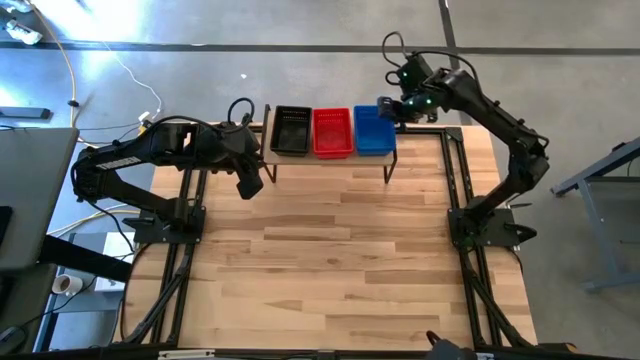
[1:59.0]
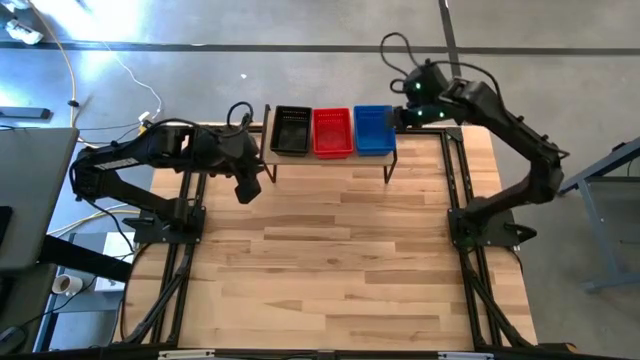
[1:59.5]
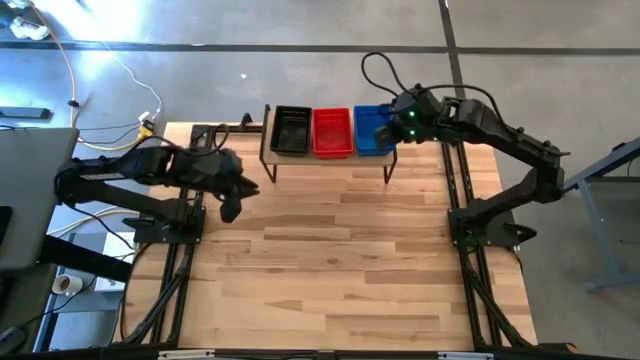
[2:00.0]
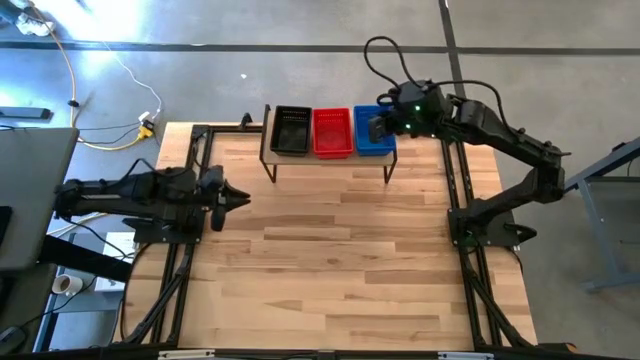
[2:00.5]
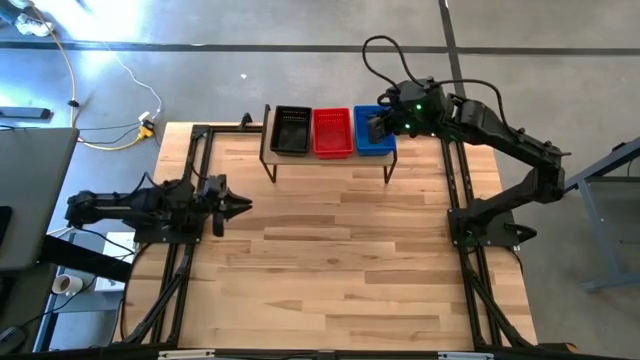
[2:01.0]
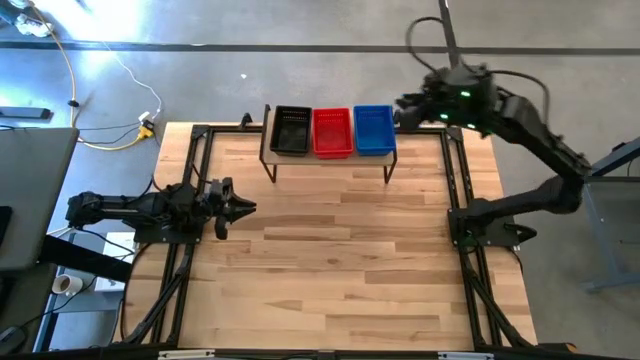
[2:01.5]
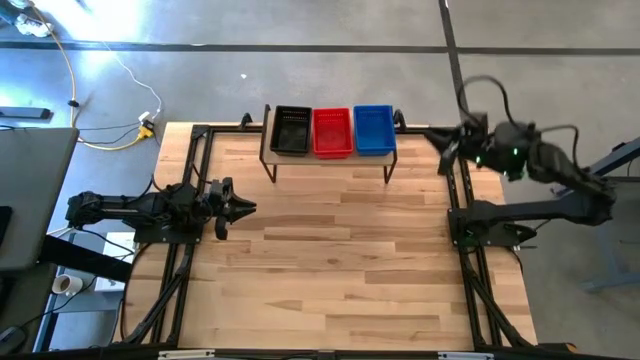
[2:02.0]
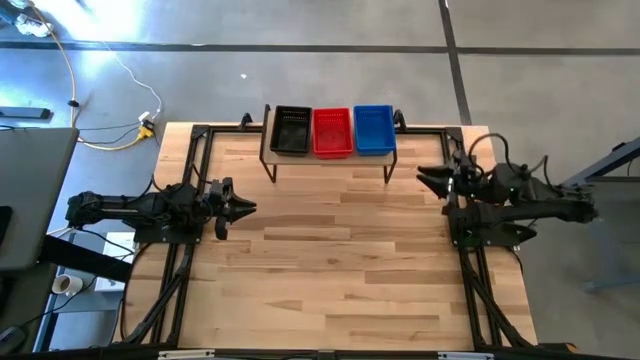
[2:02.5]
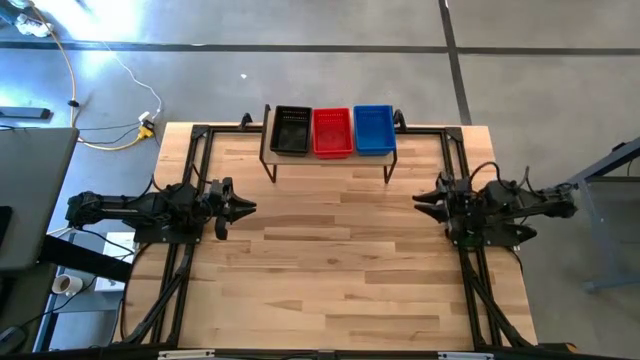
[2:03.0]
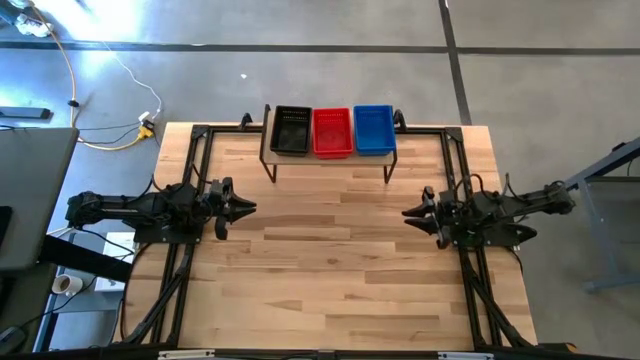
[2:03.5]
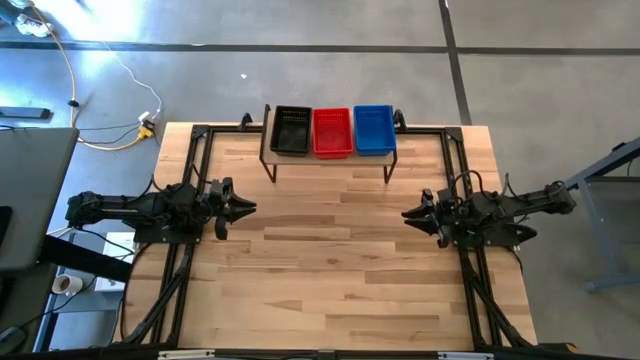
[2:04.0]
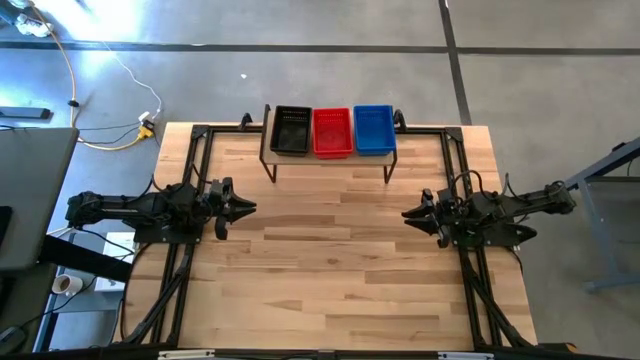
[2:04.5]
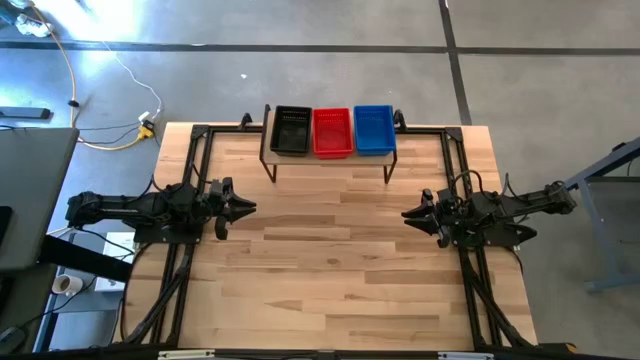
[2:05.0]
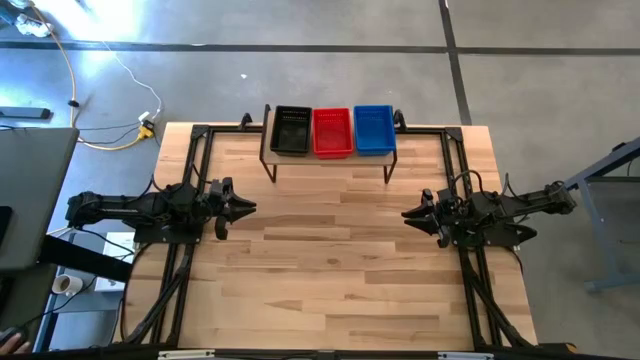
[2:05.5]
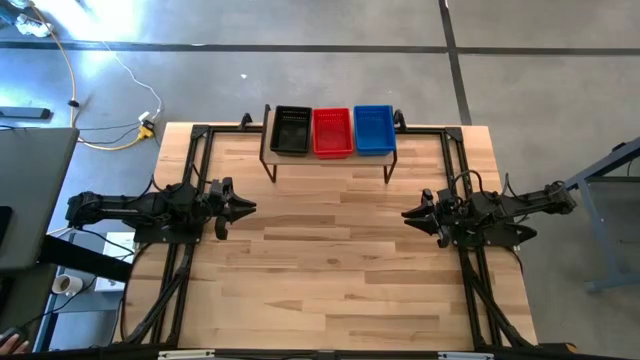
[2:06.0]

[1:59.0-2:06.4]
Task: Stack baskets on shelf by color
Return to Home Position

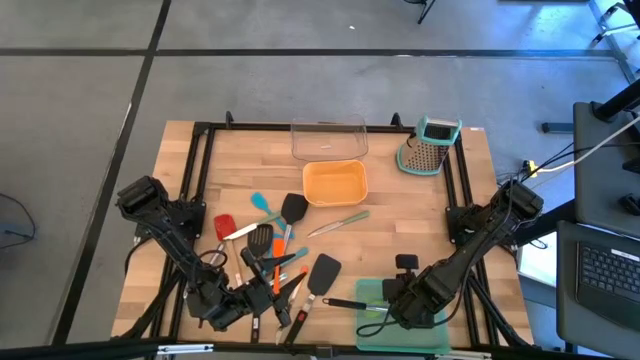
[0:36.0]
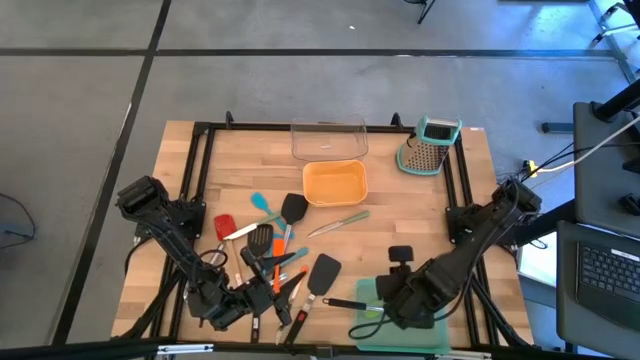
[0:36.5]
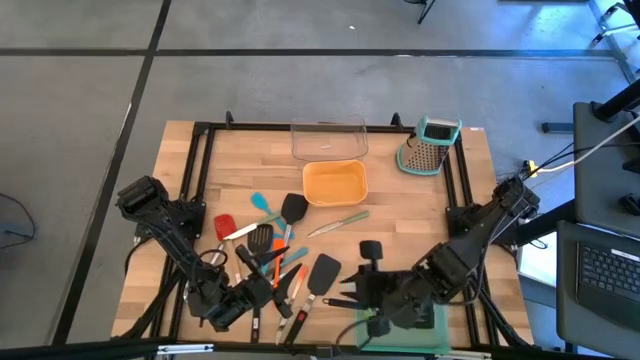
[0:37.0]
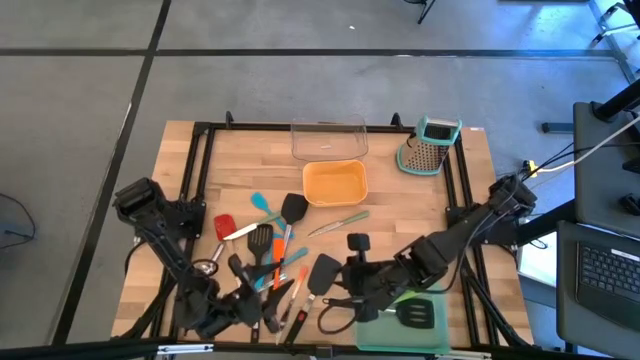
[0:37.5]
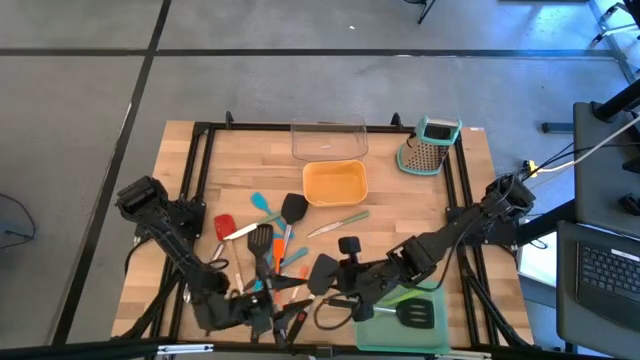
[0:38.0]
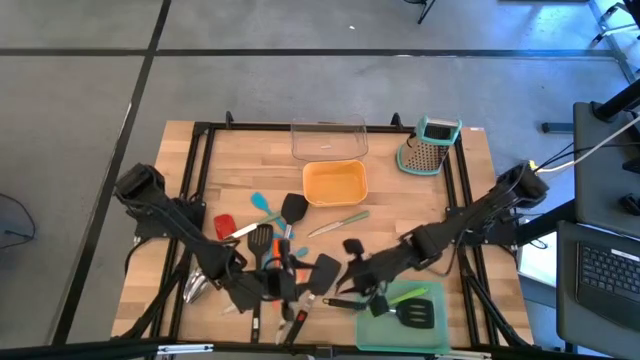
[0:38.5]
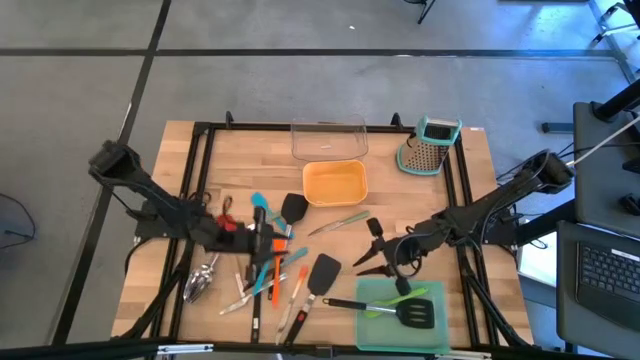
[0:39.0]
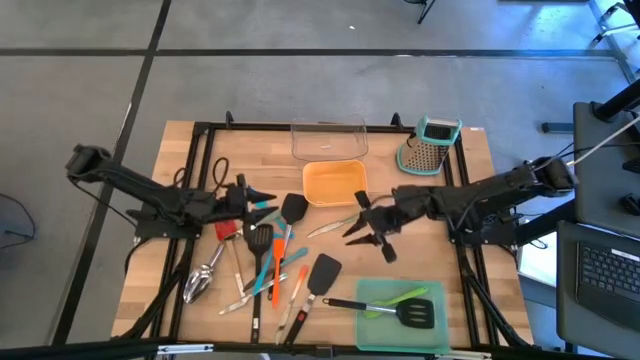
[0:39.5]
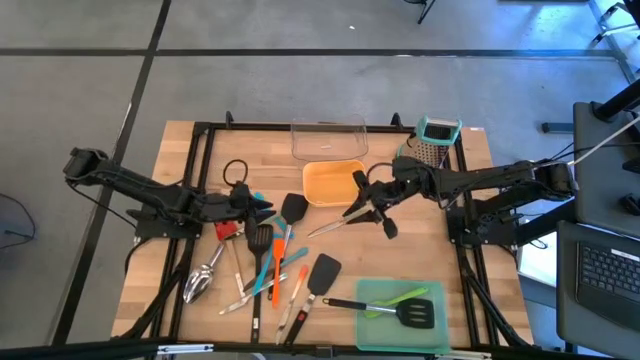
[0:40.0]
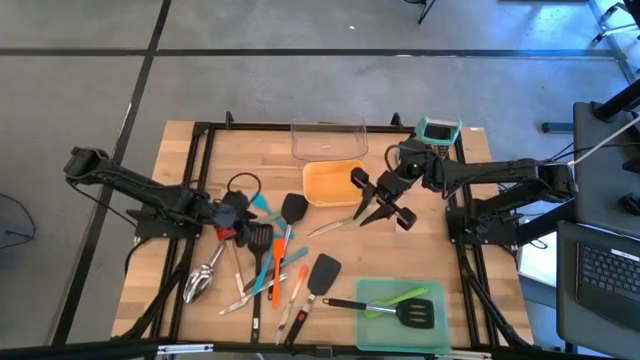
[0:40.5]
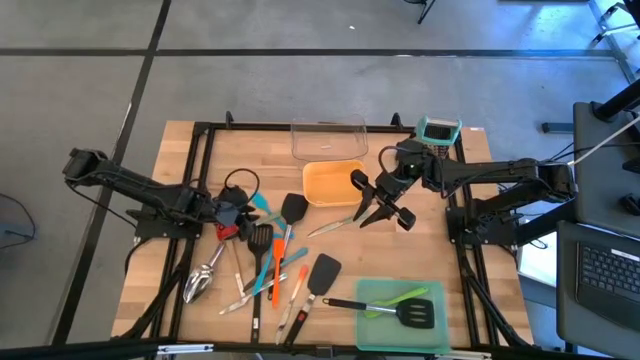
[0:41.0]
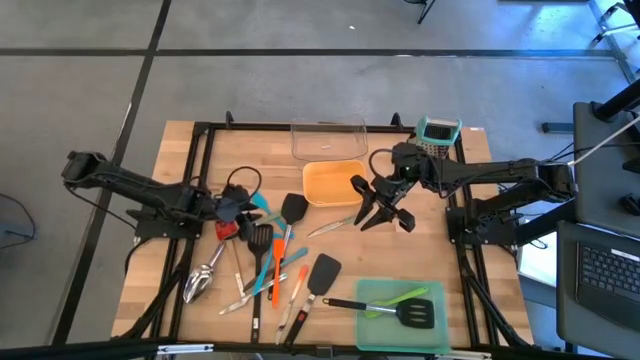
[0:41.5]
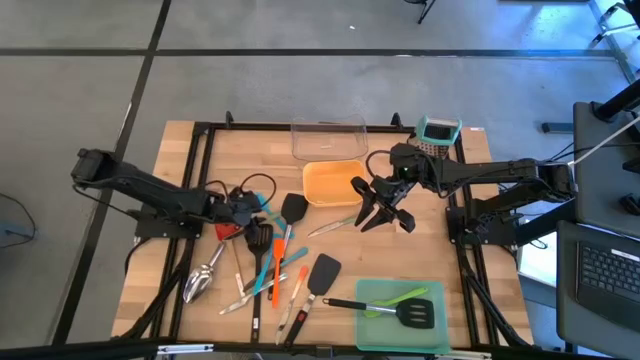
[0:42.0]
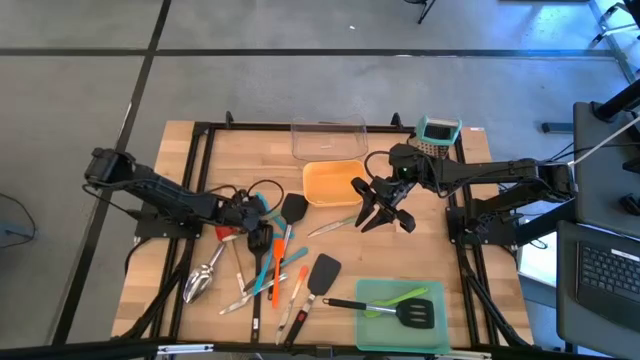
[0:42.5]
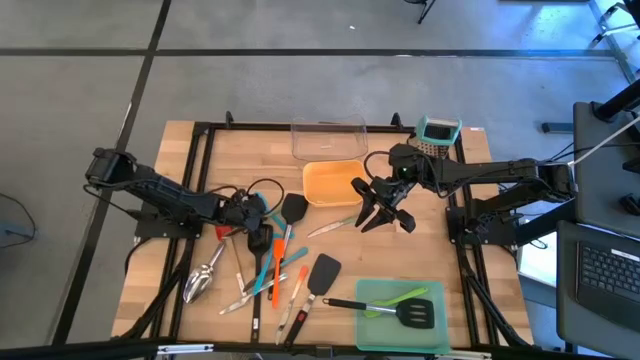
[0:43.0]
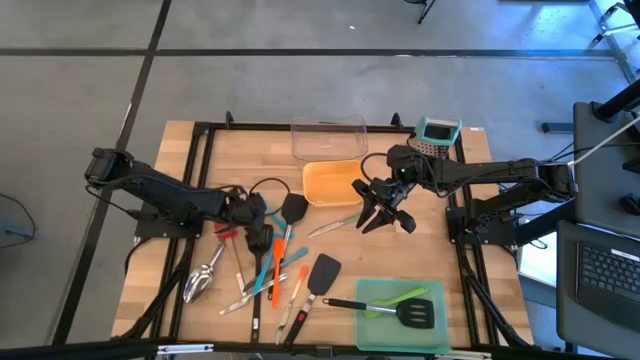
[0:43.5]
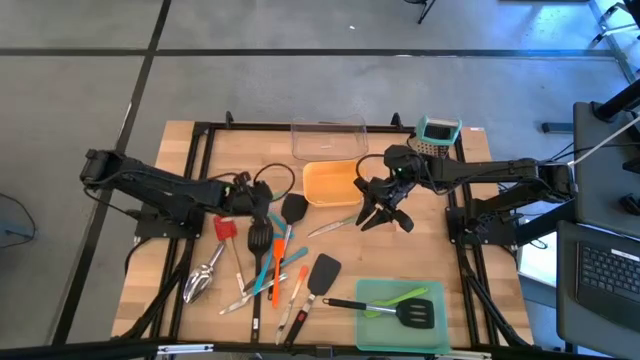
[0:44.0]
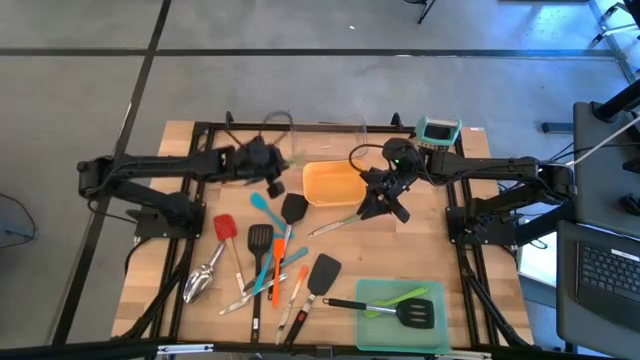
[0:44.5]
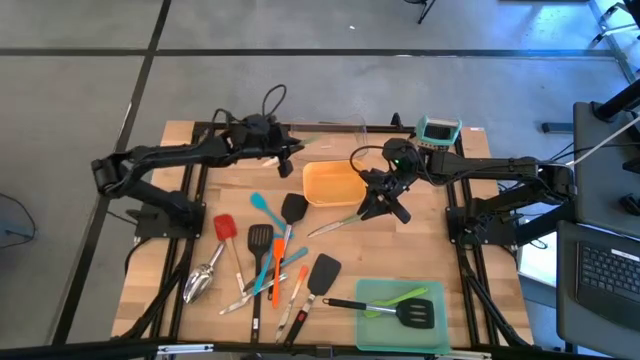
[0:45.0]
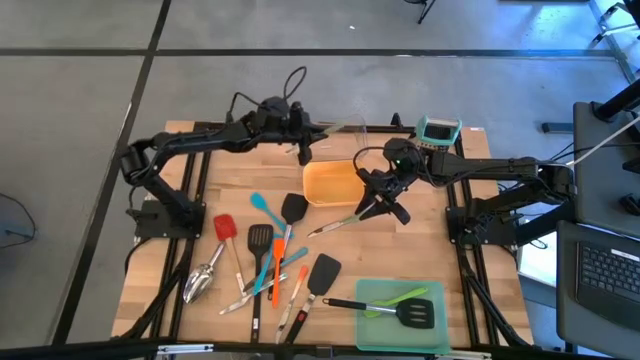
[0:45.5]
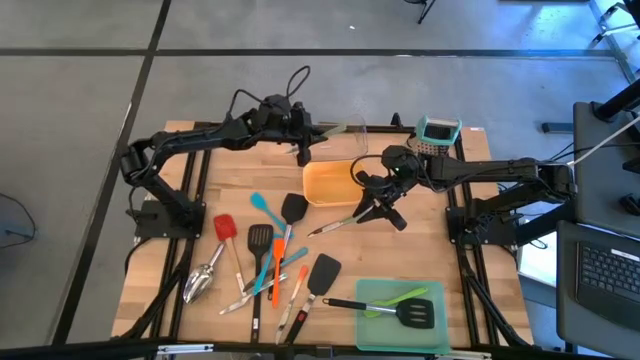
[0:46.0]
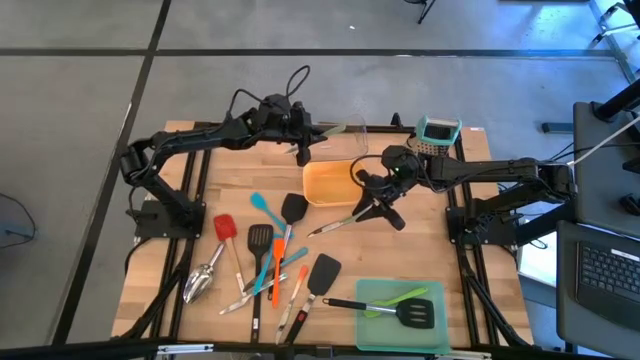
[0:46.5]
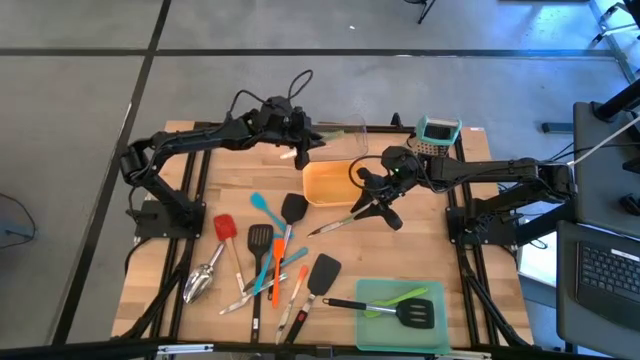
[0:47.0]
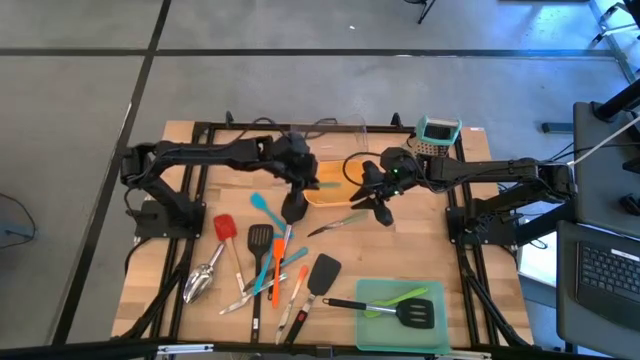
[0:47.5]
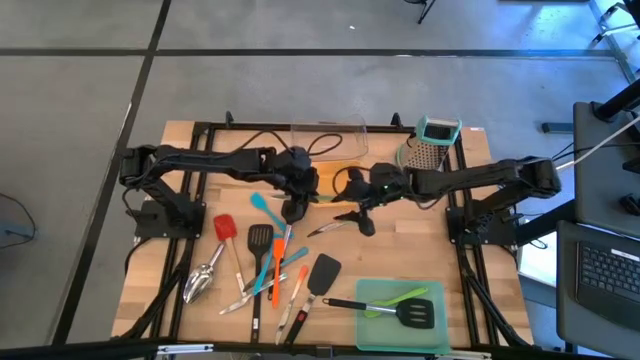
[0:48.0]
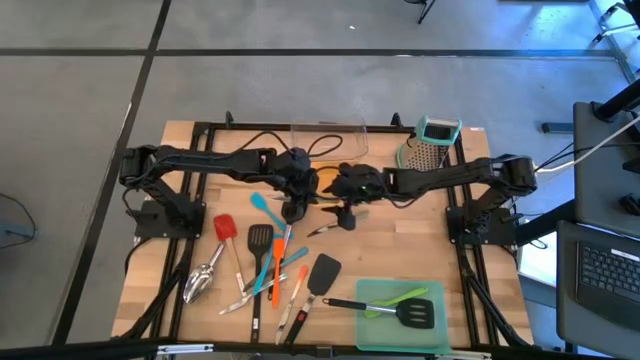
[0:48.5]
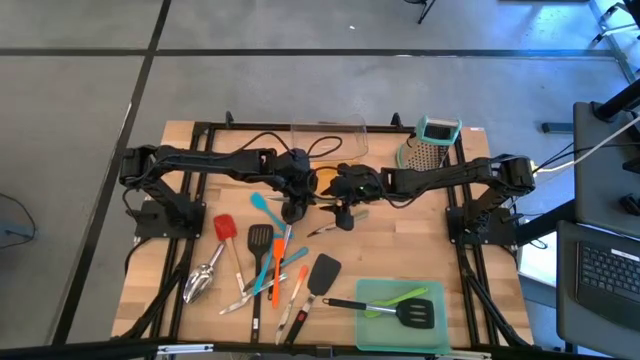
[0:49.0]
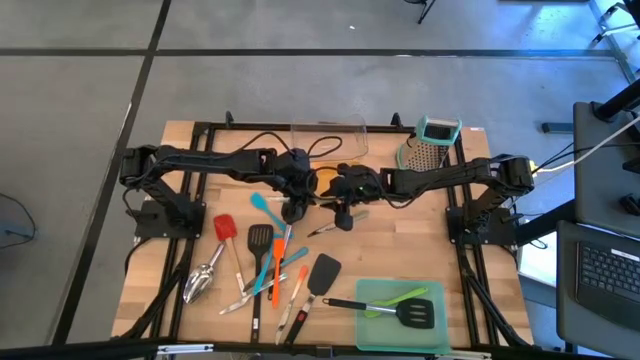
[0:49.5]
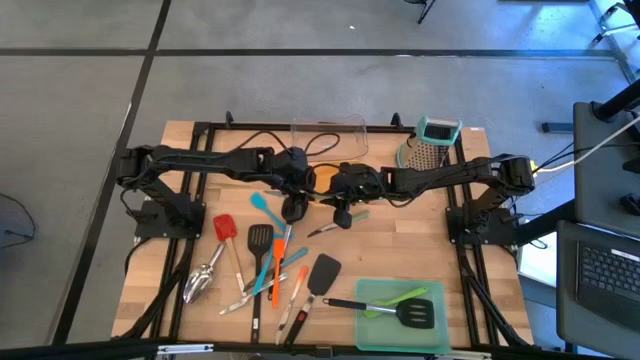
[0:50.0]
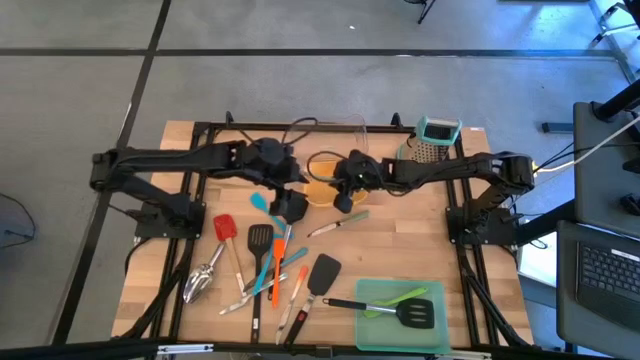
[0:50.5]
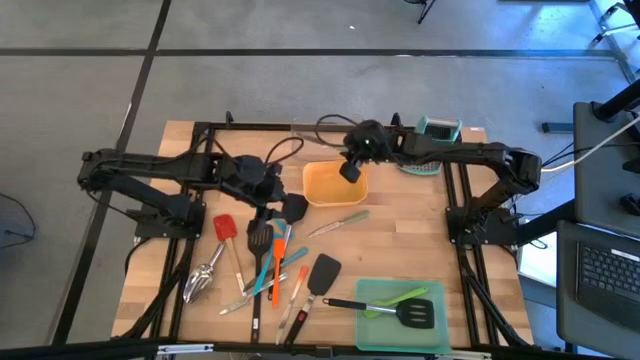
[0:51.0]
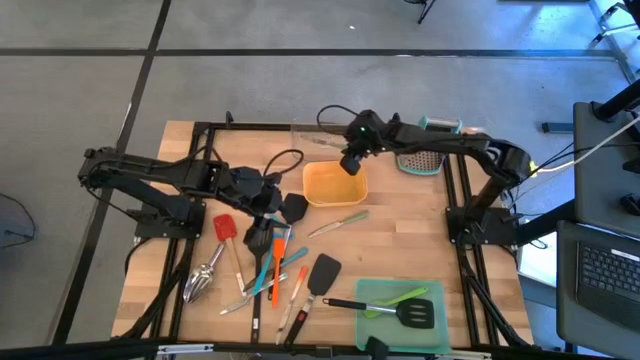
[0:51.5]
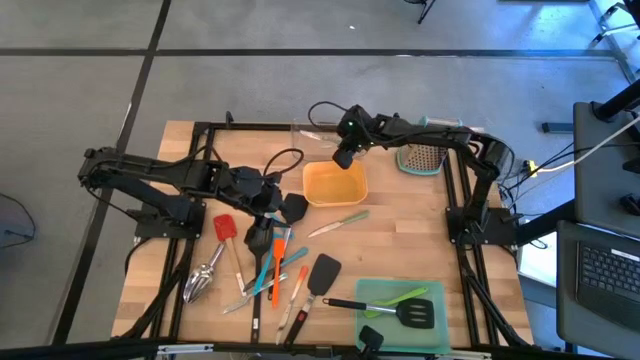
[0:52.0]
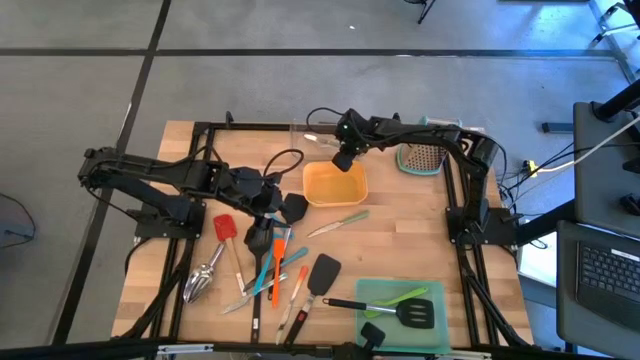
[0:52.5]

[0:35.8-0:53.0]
Task: Pick & Place Kitchen Items
Put the left green knife into the transparent bin
